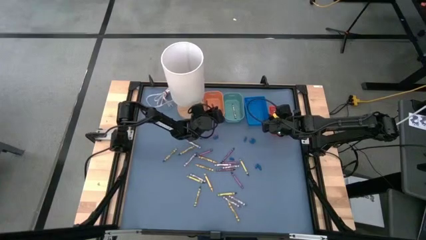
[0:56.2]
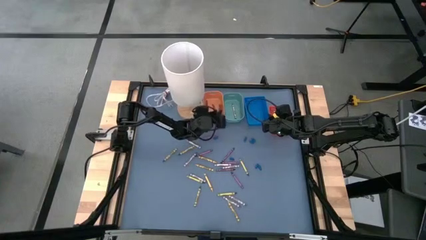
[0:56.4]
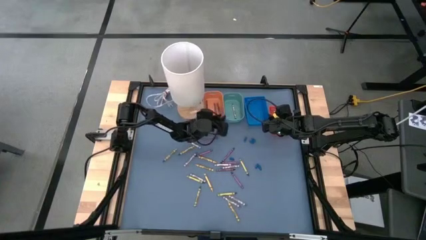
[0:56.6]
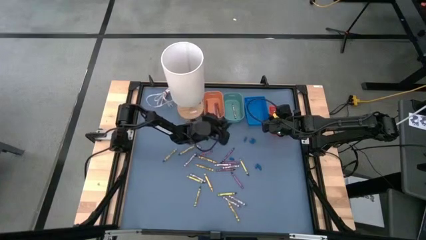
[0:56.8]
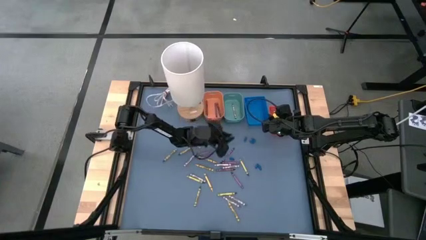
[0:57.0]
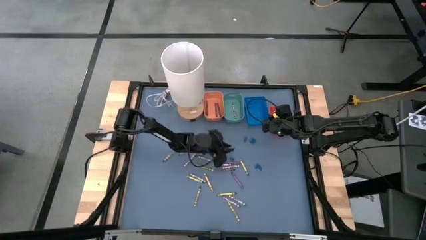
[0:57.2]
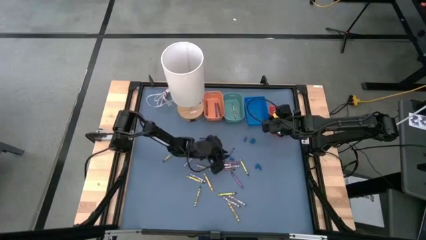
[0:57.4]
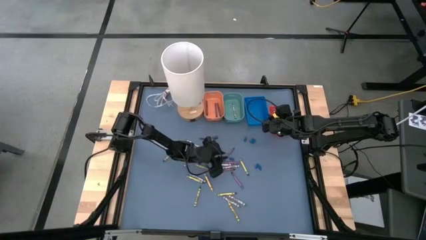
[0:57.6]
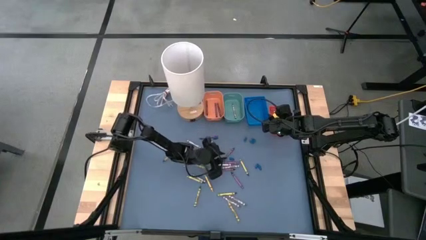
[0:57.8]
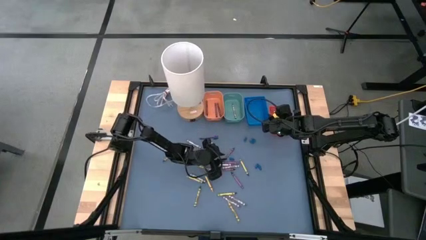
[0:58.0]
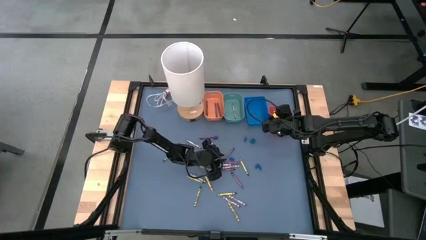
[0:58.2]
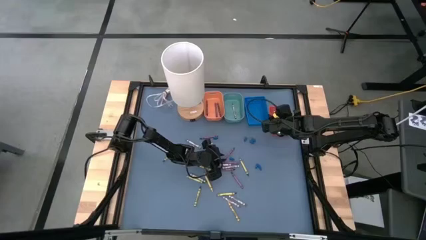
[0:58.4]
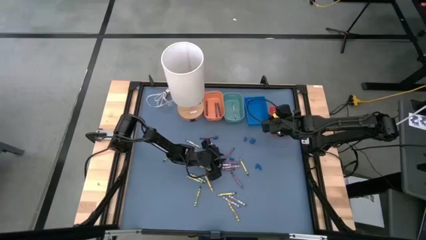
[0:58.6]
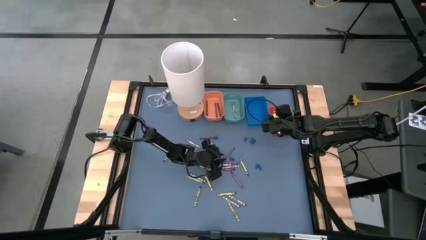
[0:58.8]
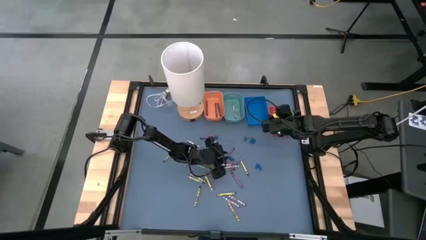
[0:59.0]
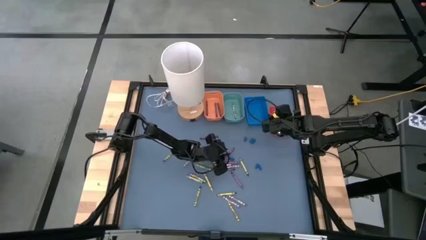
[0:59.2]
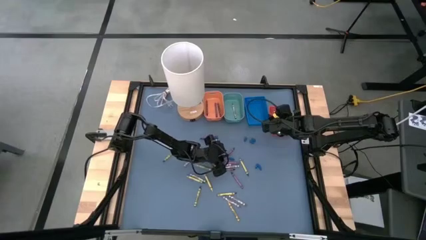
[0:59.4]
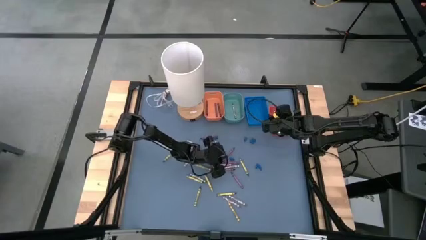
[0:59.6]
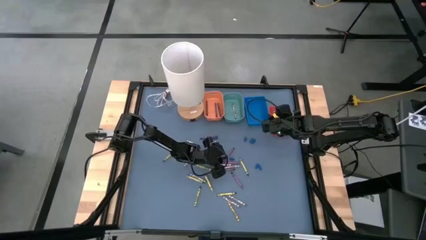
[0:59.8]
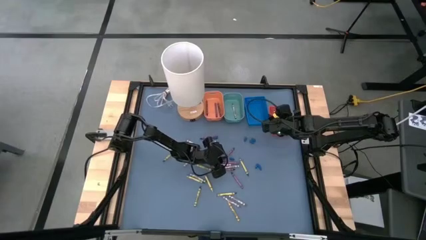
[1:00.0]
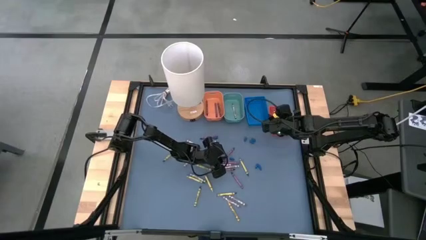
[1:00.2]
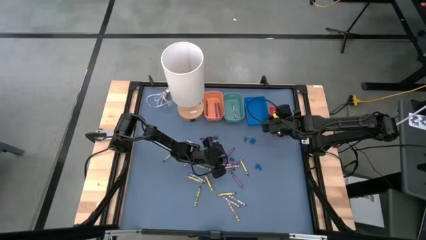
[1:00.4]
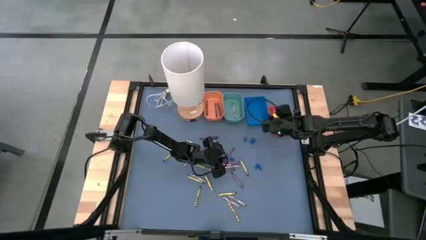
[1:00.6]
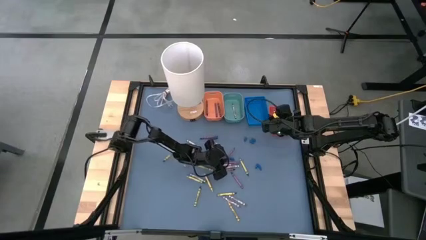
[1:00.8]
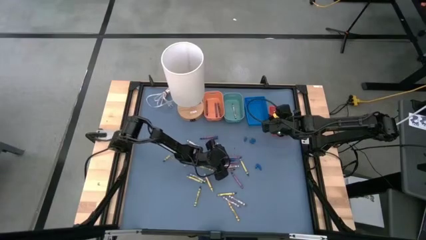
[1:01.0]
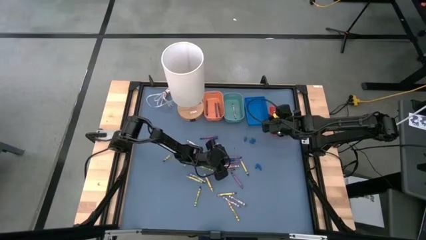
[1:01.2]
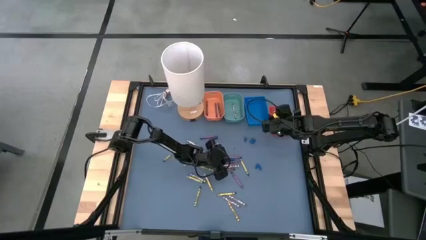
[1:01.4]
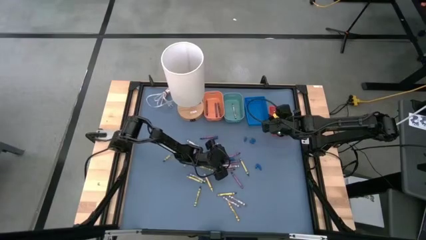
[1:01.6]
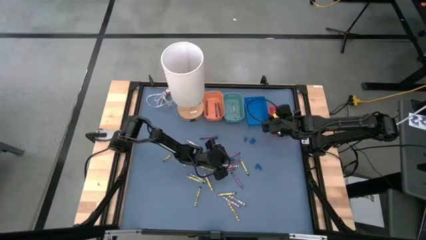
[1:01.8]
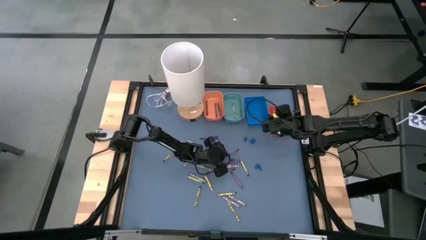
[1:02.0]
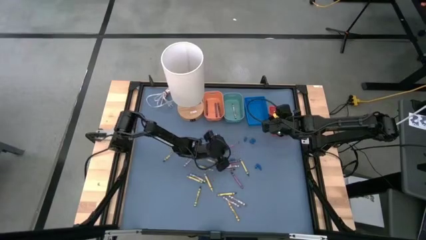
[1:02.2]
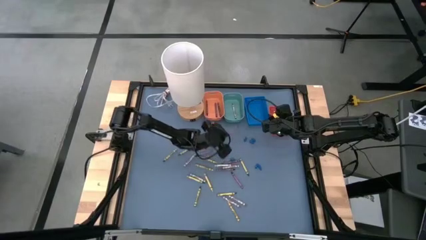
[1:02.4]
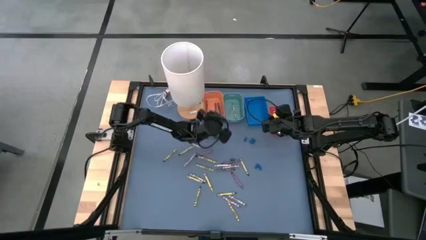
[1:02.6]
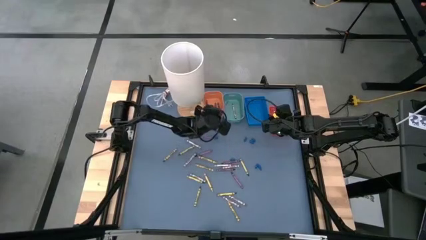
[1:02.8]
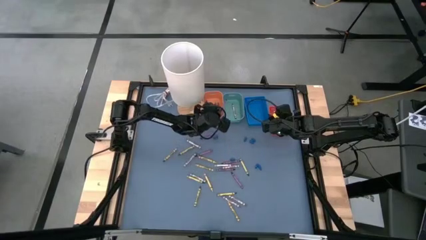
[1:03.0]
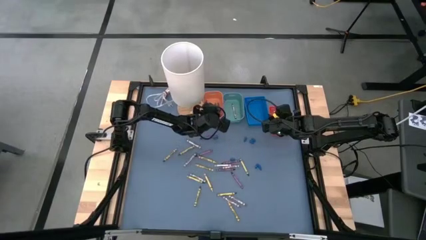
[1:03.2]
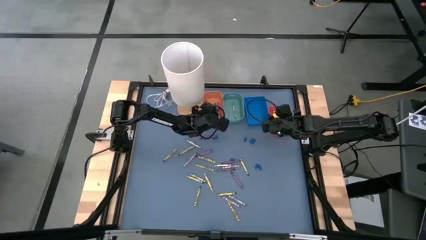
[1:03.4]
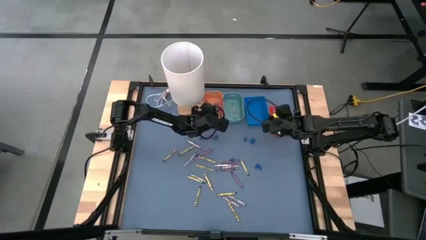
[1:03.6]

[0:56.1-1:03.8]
Task: Sort crayons
Put the purple crayon into the light orange bin

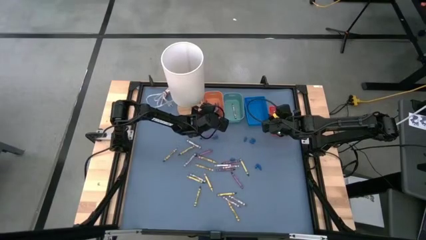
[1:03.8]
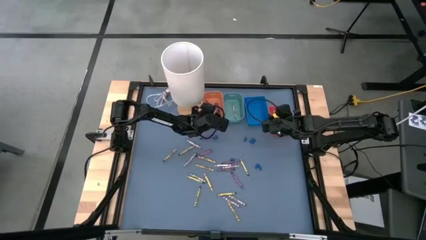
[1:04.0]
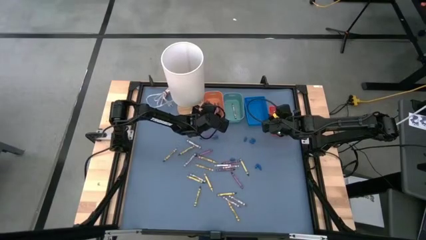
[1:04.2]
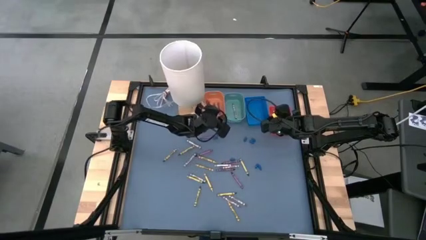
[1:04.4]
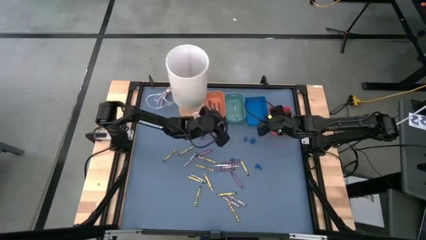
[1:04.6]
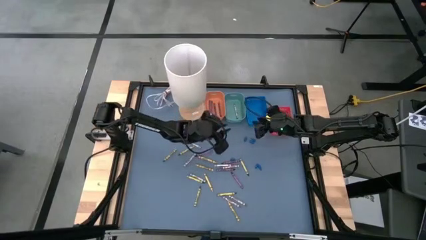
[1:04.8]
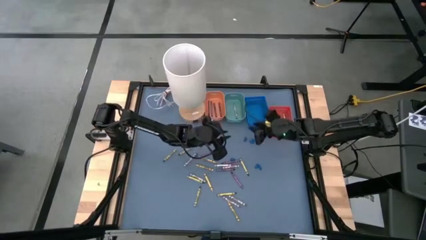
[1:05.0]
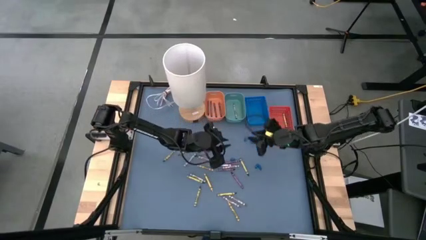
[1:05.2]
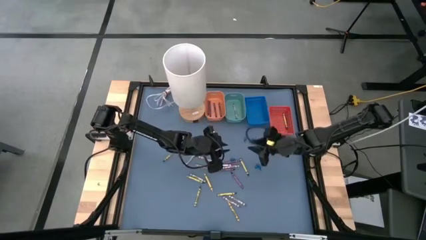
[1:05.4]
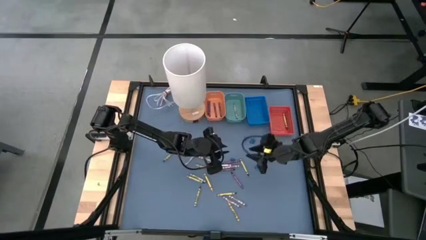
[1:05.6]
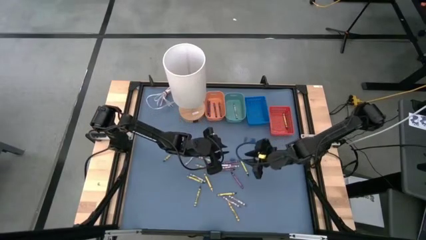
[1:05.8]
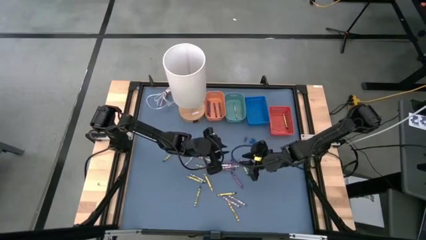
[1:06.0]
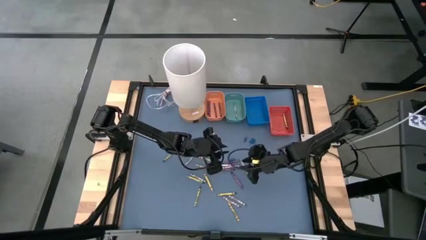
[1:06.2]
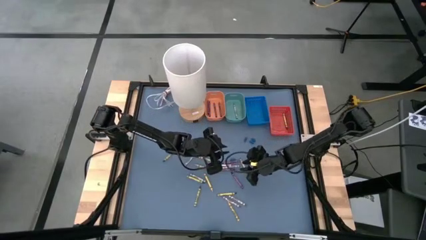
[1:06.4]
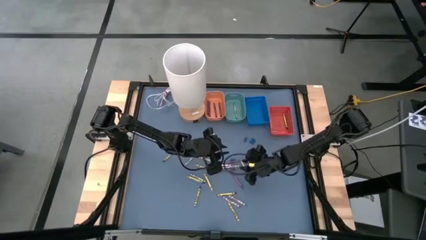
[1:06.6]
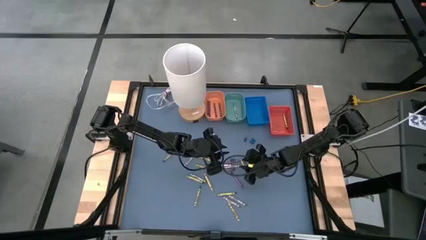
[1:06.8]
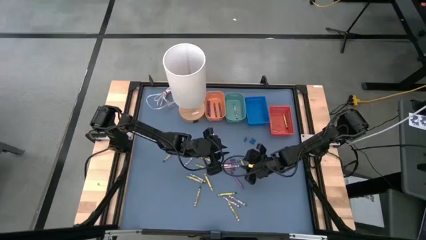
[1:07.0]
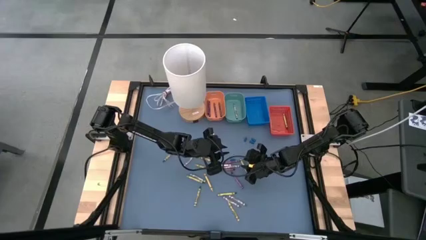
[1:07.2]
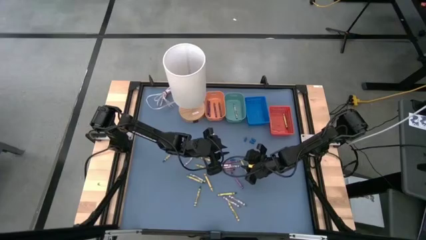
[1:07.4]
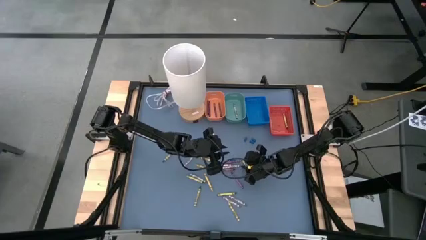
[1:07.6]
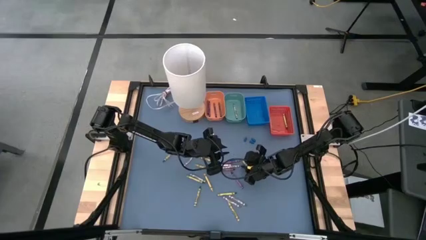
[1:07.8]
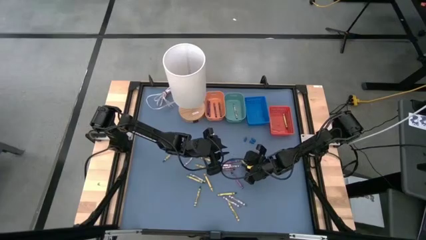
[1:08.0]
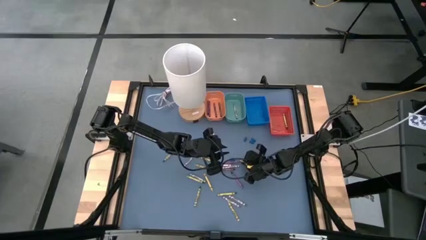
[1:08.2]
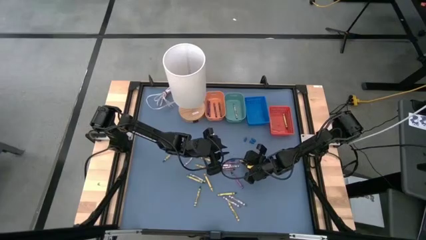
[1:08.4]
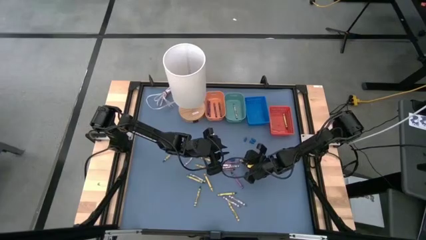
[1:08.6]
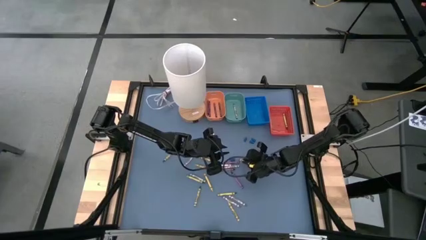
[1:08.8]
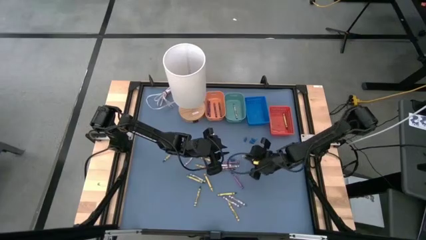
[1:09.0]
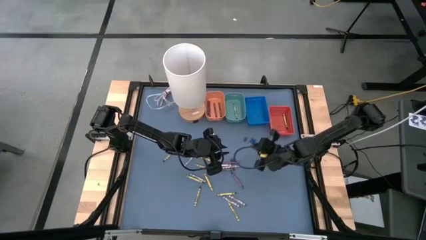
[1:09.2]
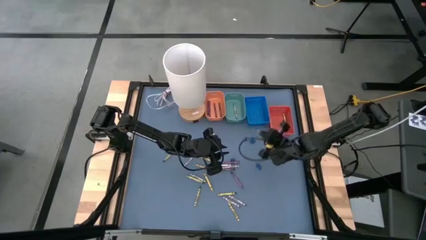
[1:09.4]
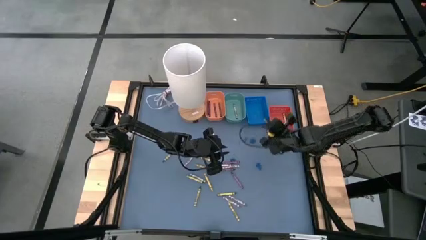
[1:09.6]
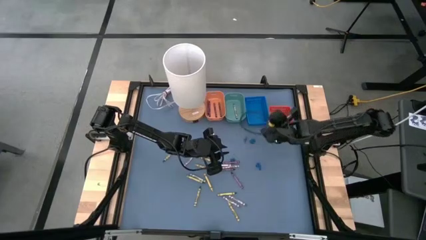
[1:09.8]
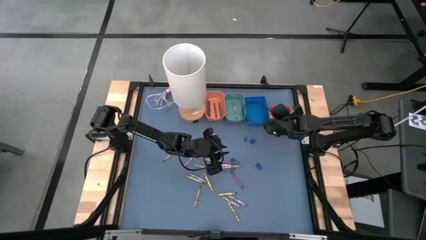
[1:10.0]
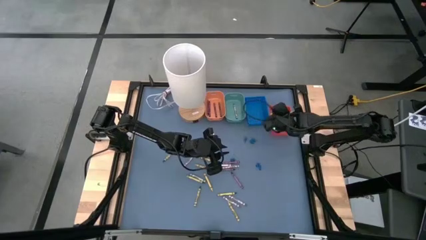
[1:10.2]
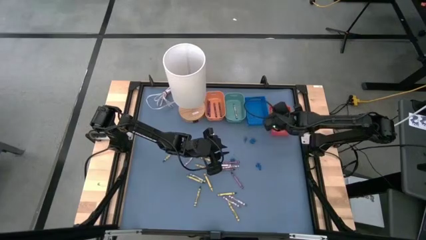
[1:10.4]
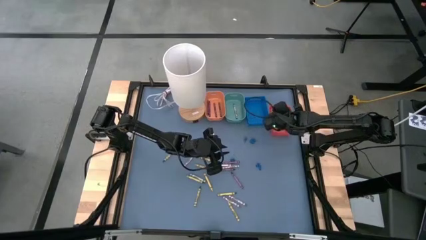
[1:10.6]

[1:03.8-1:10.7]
Put the green crayon into the orange bin

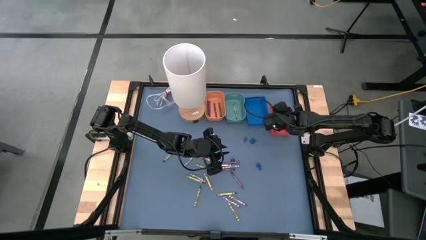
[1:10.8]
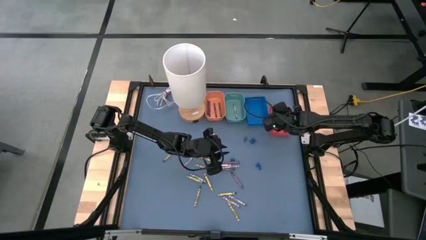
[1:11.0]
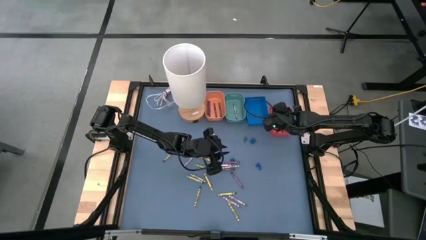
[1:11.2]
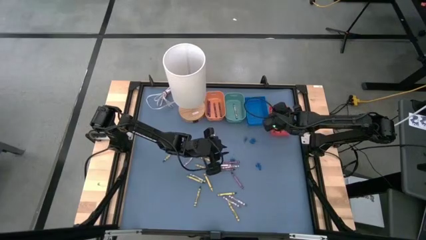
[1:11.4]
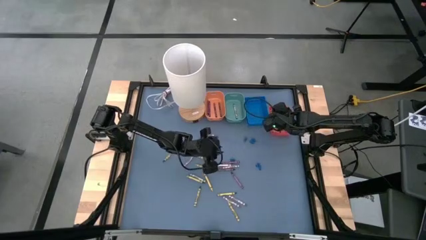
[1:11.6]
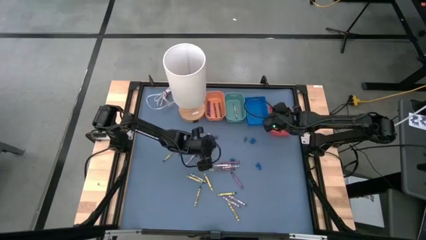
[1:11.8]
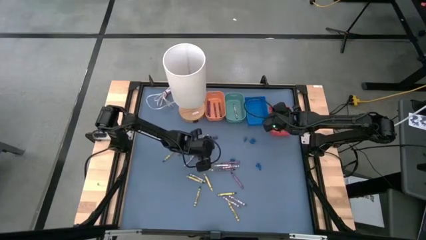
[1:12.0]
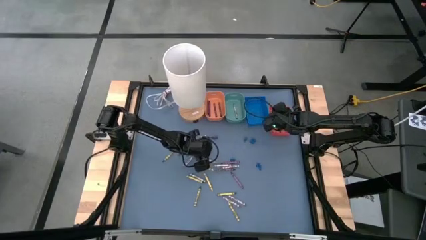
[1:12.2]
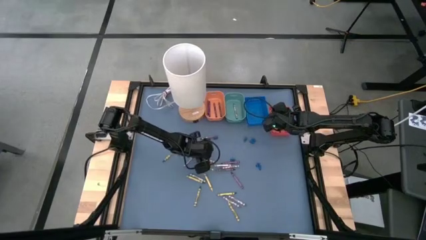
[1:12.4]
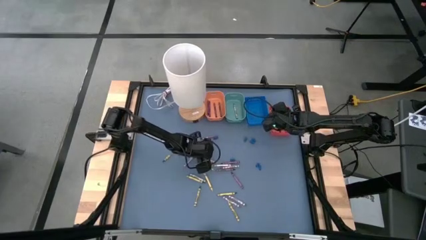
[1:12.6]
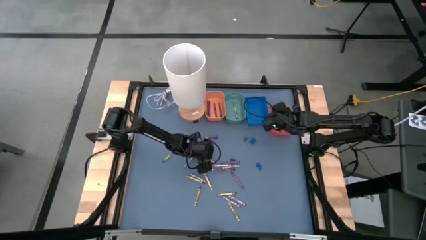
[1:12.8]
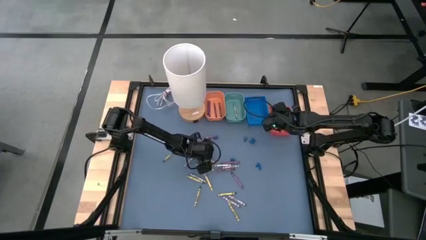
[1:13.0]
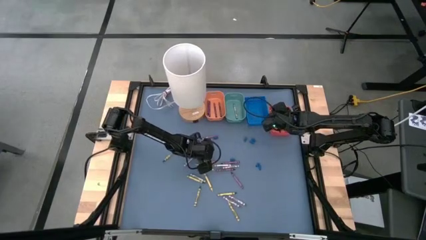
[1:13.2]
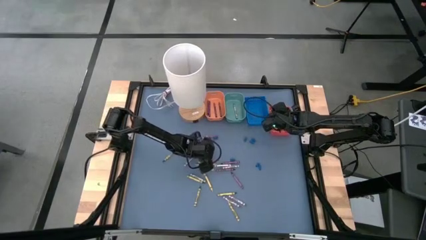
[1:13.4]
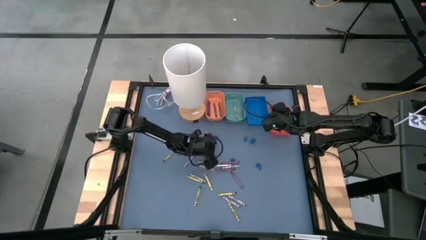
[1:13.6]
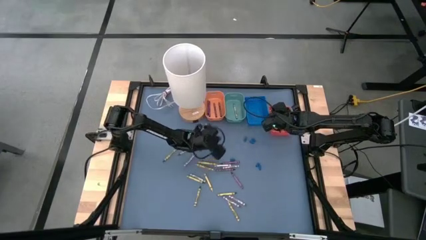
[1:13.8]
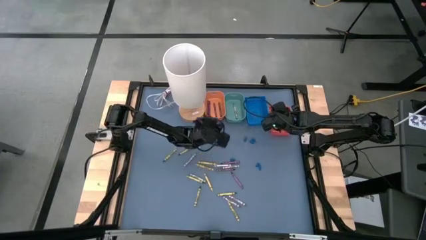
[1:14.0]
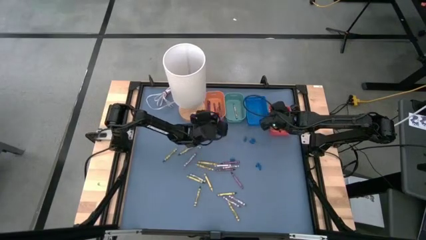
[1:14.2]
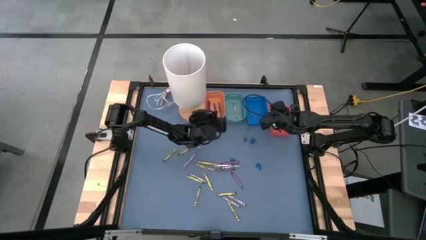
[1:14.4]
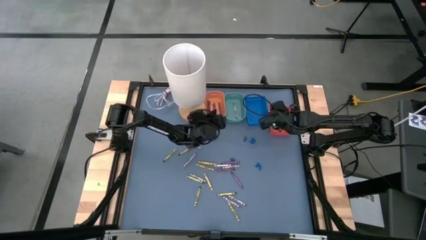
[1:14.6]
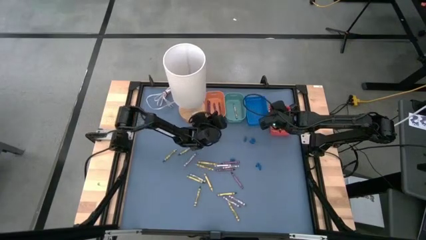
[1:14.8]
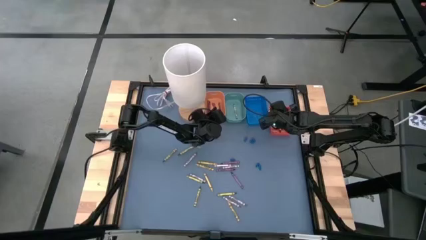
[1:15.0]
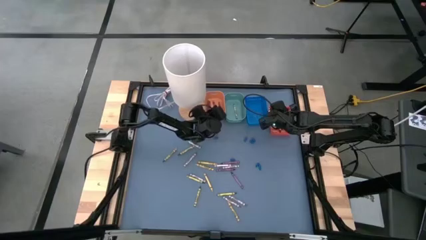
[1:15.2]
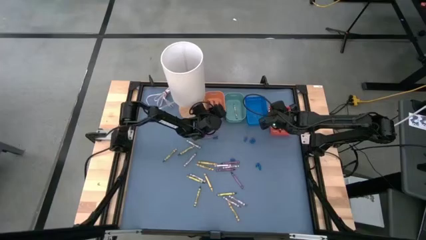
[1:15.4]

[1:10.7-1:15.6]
Put the purple crayon into the light orange bin
